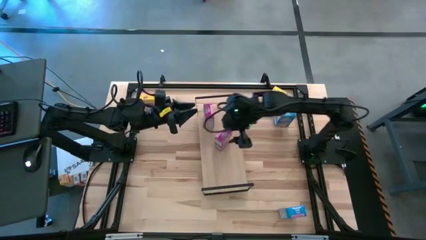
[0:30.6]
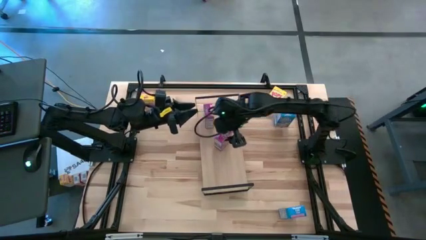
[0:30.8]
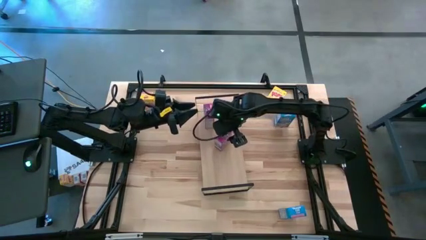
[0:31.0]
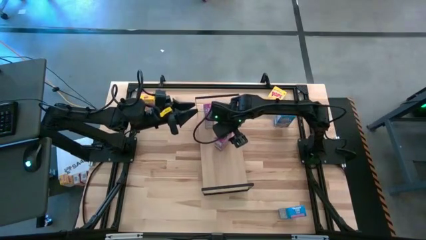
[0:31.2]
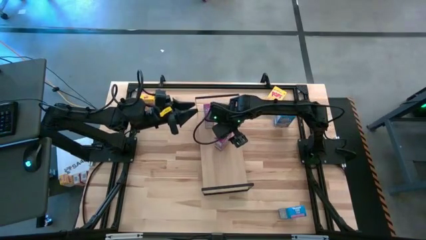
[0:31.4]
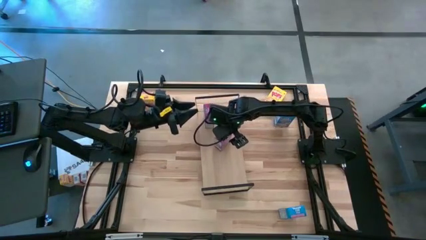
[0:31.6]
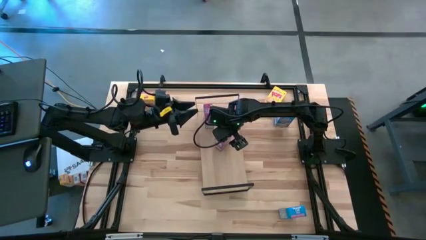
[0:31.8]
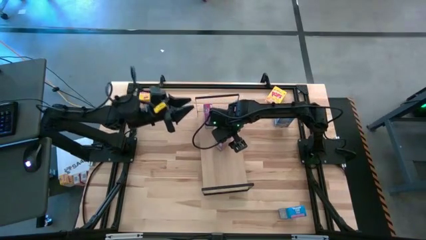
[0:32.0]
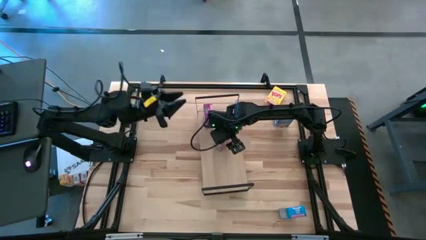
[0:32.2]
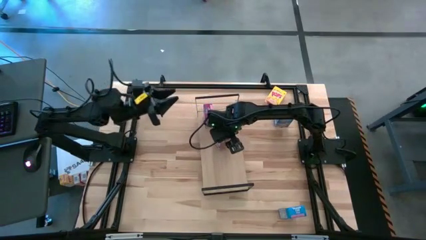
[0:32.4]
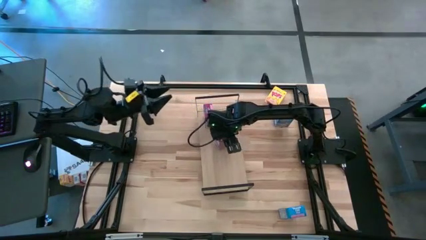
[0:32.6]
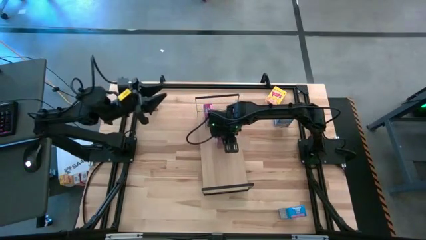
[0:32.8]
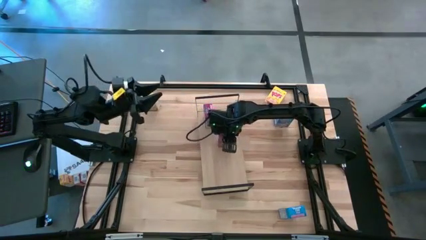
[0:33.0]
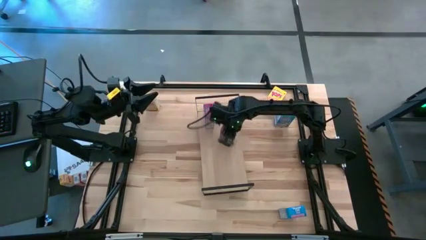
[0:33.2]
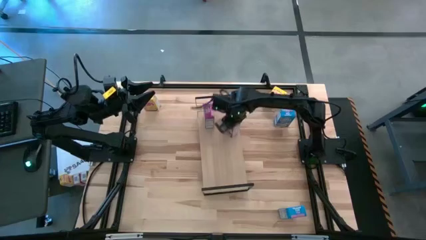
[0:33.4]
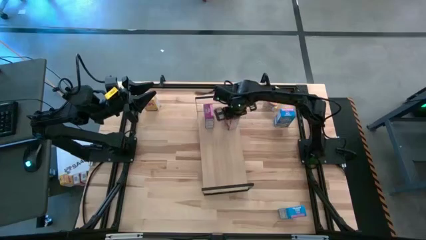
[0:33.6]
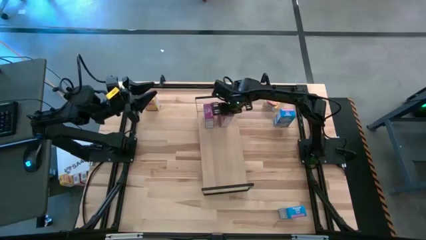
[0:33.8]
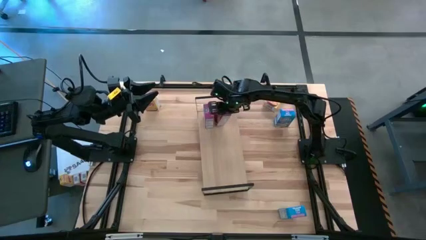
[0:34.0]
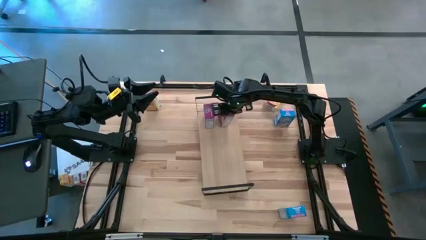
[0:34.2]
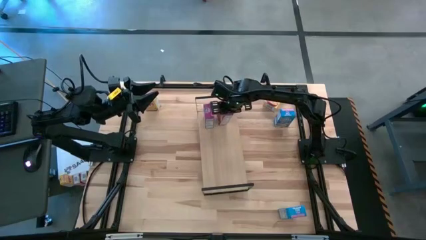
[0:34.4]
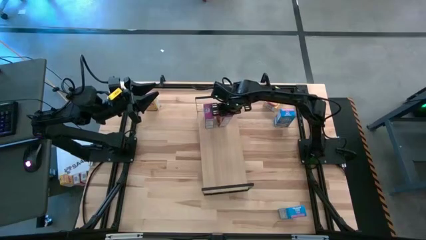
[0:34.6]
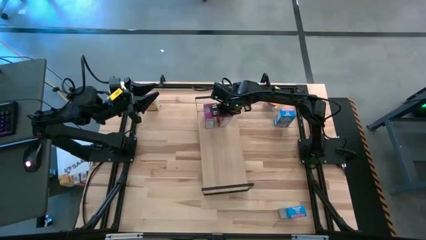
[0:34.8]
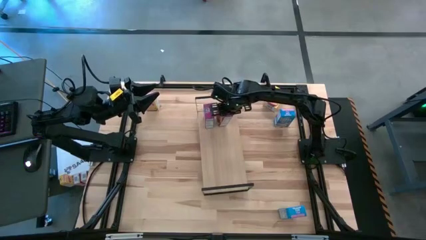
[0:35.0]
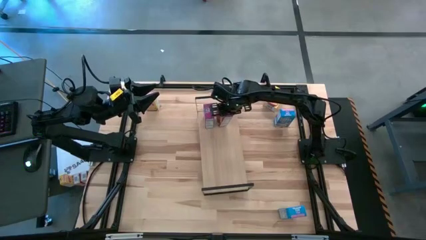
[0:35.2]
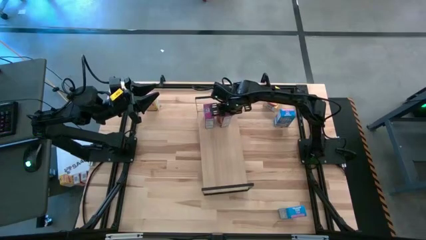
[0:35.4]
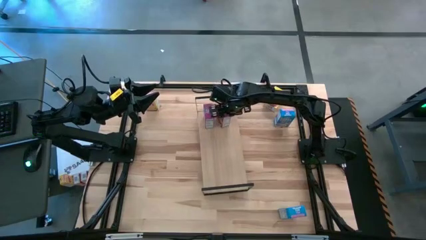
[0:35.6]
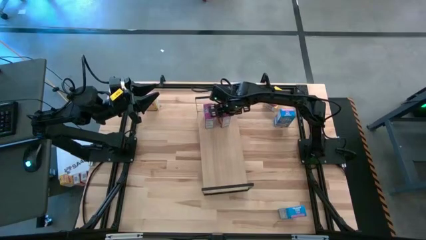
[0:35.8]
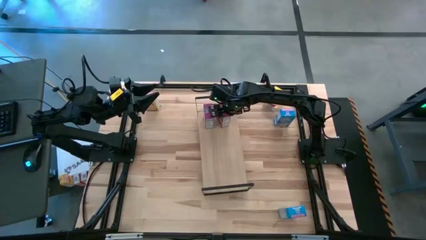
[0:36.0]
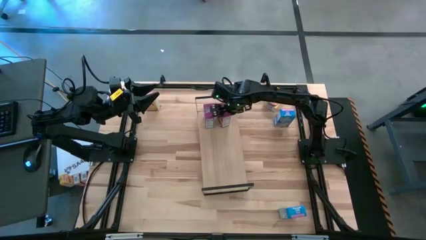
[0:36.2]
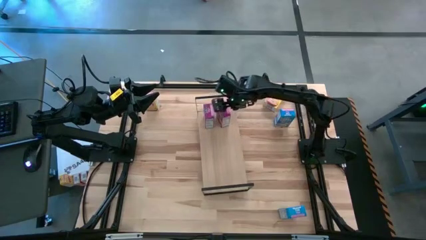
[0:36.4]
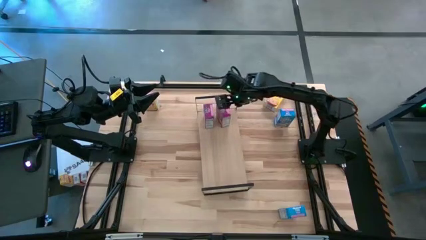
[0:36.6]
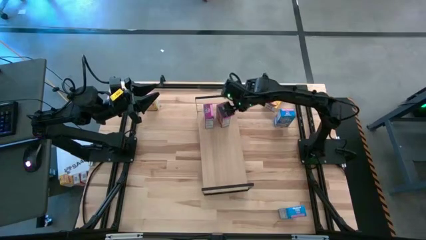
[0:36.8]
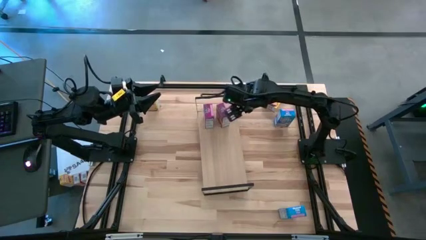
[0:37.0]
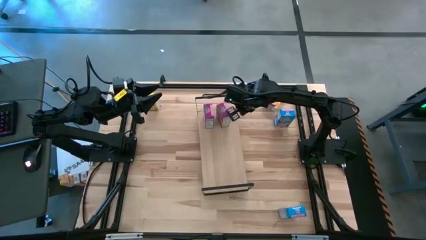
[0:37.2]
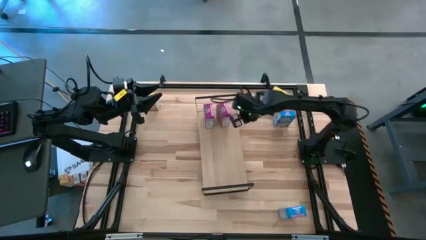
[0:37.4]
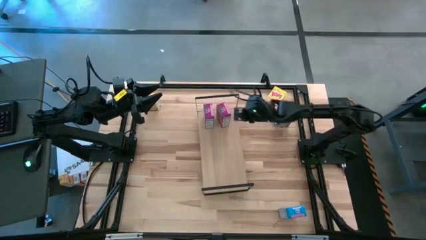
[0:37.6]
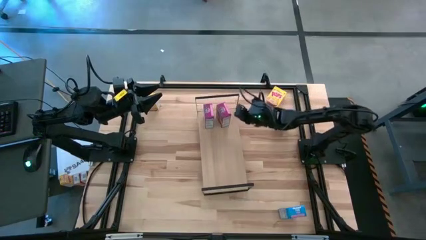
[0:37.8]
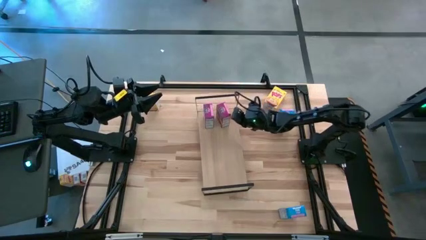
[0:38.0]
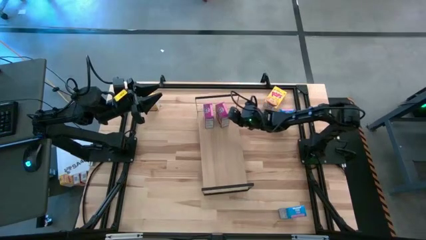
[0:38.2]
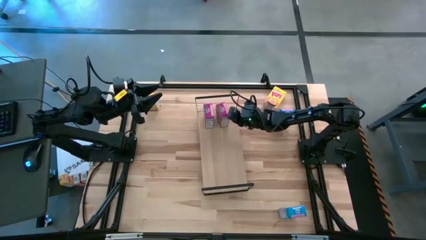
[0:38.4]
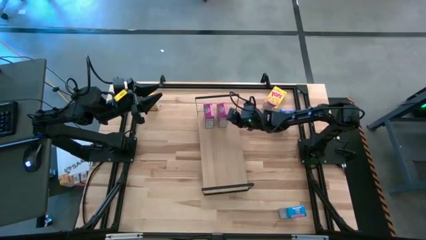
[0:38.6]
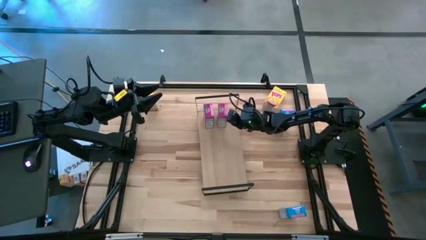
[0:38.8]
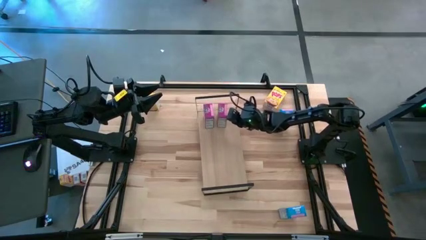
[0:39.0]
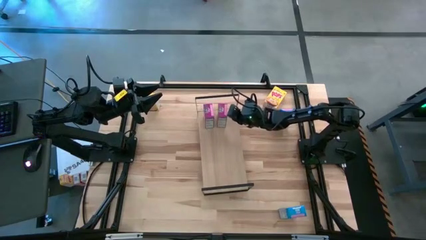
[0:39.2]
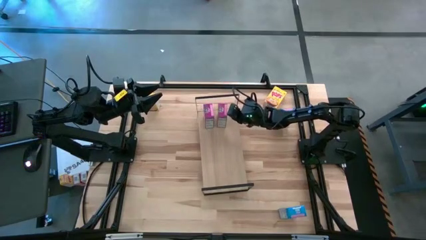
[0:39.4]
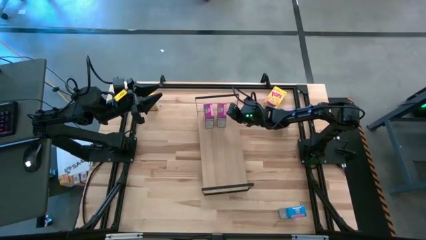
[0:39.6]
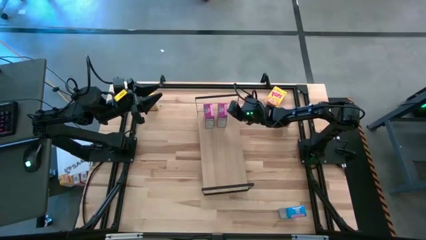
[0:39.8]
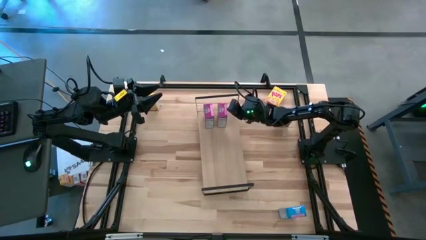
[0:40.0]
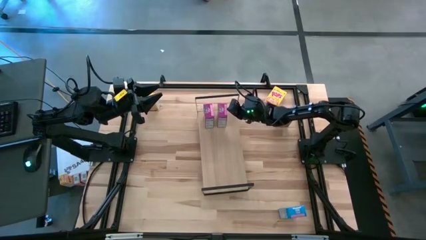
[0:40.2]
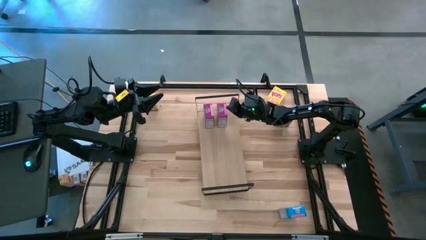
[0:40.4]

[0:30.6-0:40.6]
Task: Stack cereal on shelf
Put the purple cereal box on the shelf aligned with the other purple cereal box
